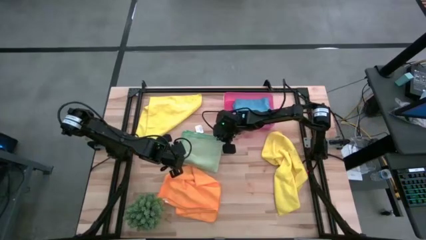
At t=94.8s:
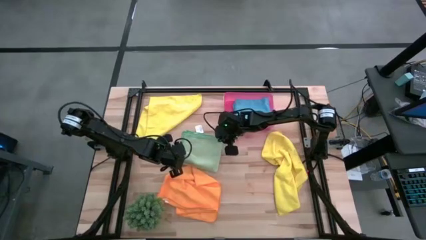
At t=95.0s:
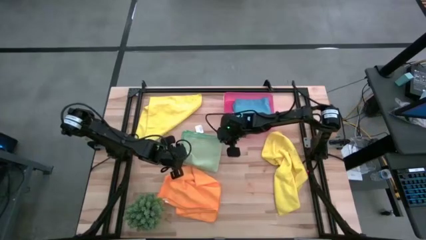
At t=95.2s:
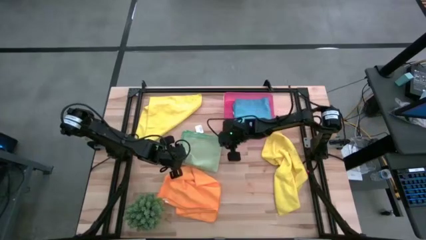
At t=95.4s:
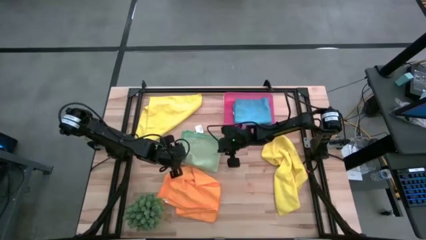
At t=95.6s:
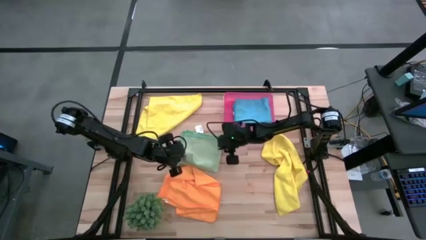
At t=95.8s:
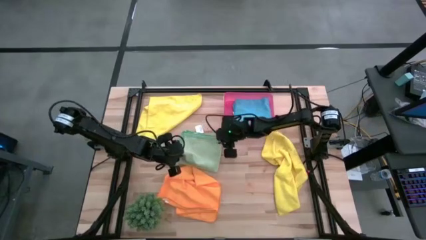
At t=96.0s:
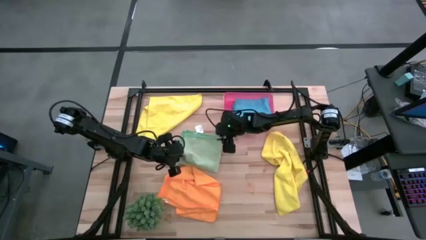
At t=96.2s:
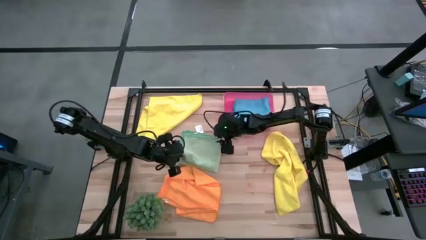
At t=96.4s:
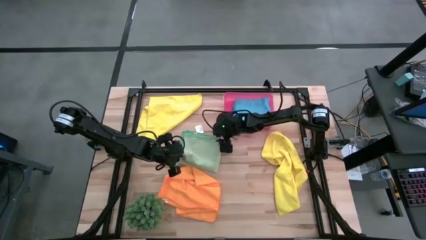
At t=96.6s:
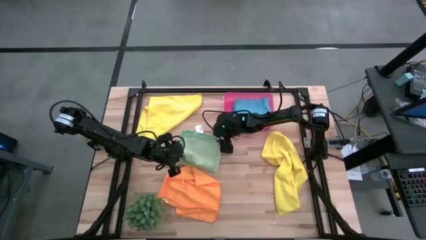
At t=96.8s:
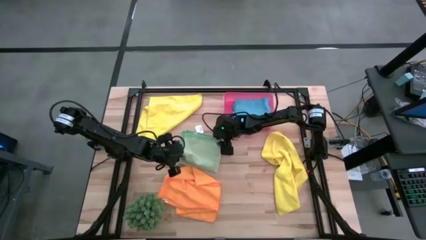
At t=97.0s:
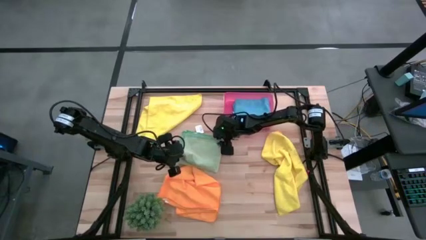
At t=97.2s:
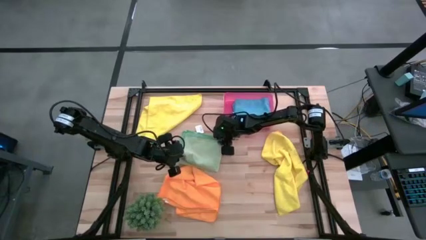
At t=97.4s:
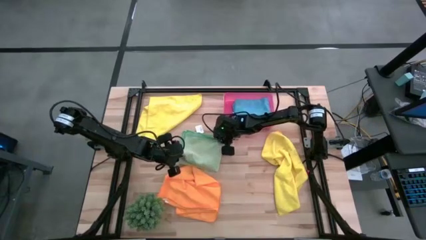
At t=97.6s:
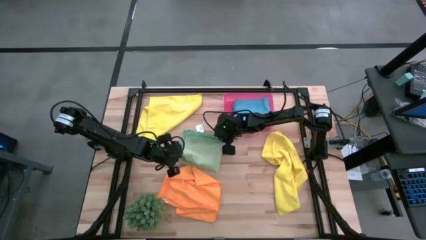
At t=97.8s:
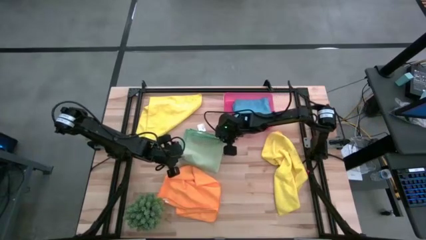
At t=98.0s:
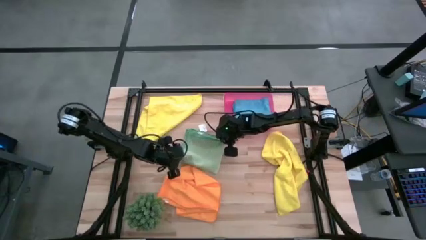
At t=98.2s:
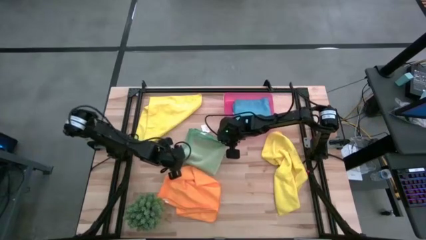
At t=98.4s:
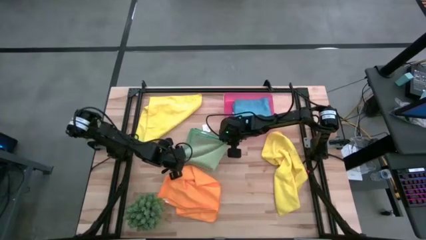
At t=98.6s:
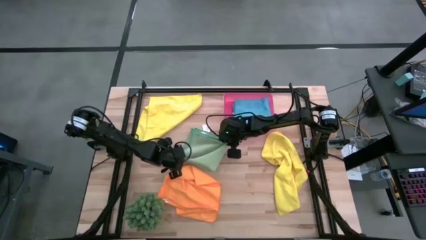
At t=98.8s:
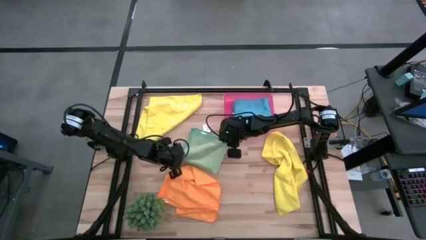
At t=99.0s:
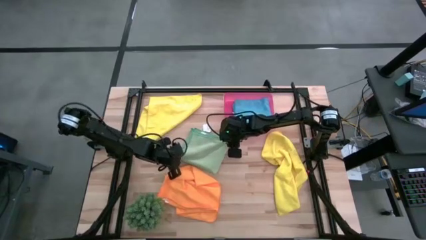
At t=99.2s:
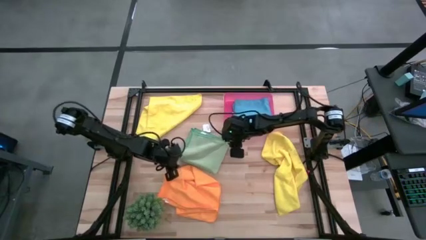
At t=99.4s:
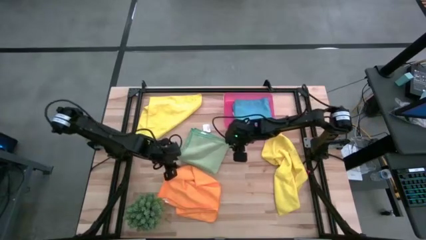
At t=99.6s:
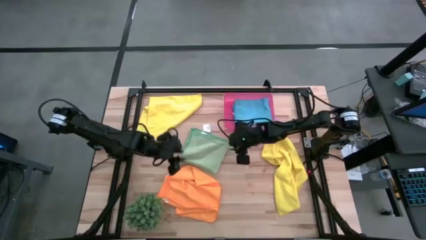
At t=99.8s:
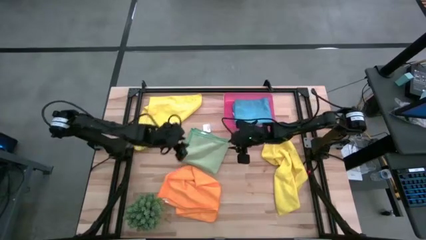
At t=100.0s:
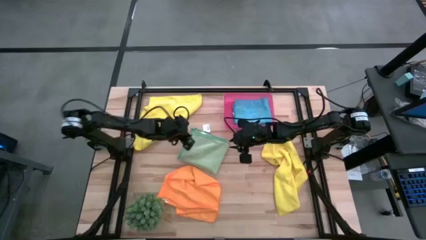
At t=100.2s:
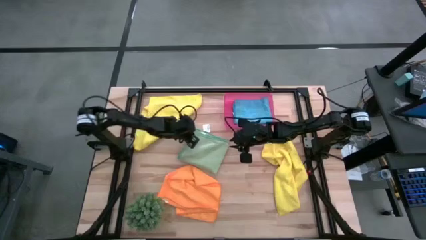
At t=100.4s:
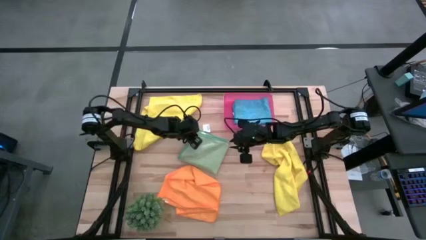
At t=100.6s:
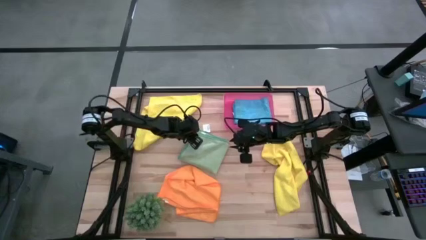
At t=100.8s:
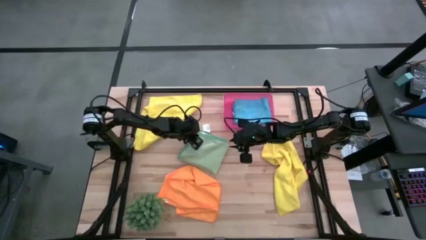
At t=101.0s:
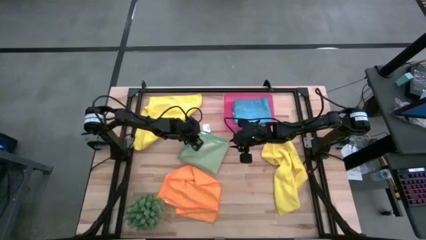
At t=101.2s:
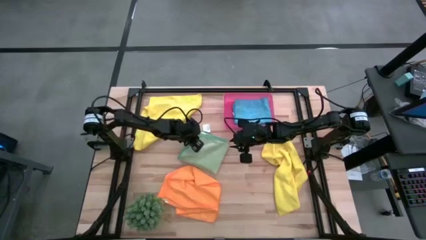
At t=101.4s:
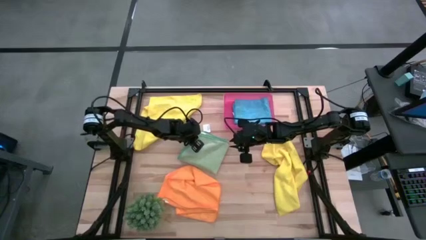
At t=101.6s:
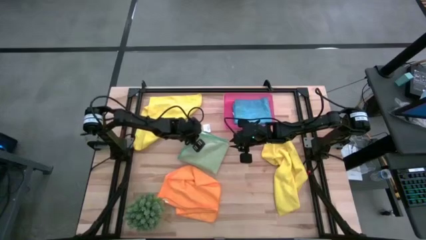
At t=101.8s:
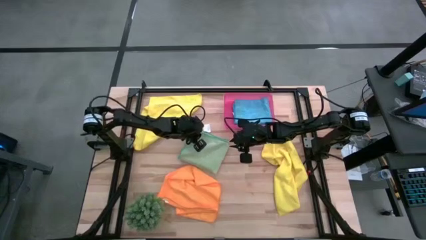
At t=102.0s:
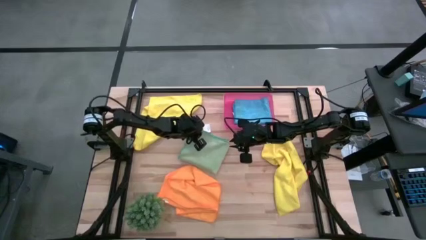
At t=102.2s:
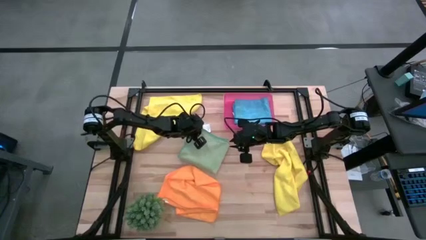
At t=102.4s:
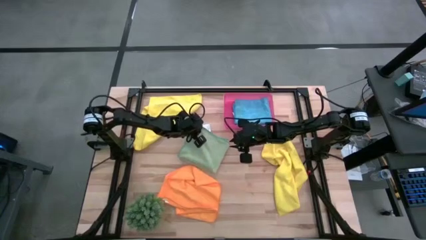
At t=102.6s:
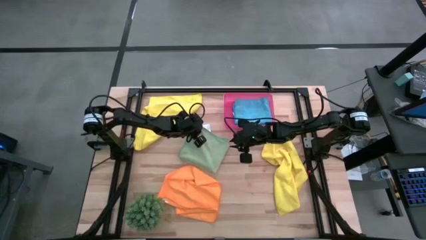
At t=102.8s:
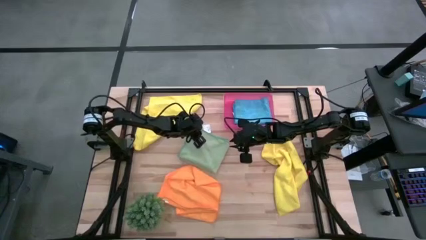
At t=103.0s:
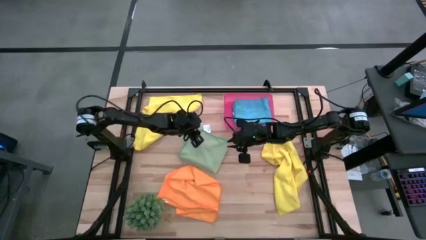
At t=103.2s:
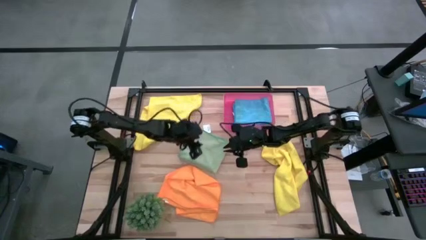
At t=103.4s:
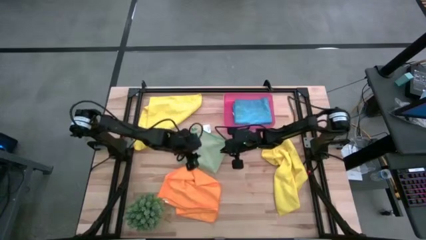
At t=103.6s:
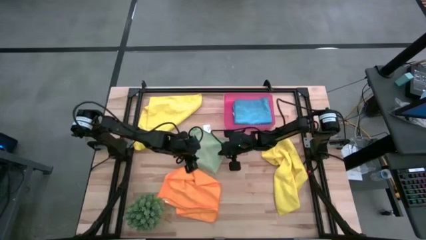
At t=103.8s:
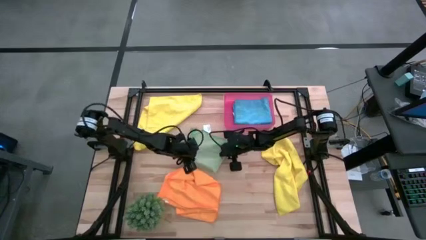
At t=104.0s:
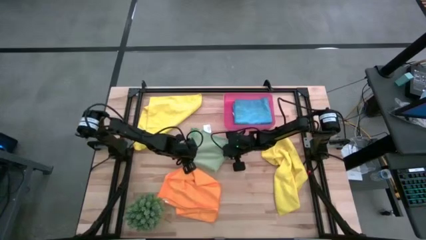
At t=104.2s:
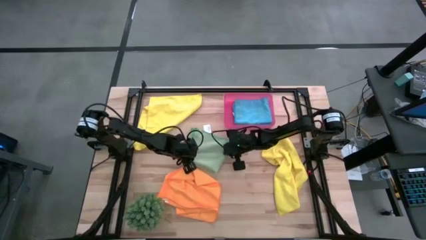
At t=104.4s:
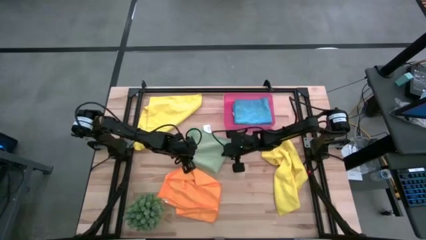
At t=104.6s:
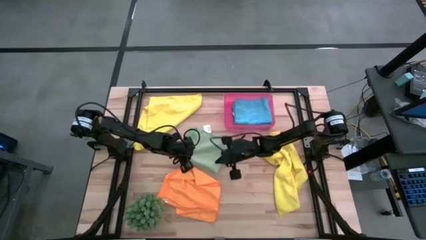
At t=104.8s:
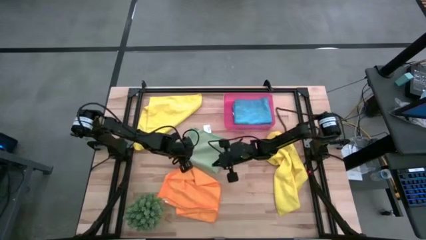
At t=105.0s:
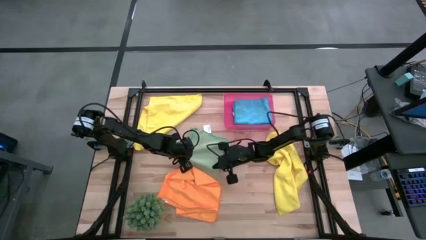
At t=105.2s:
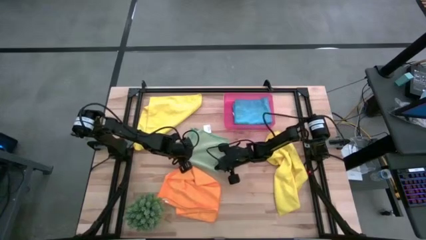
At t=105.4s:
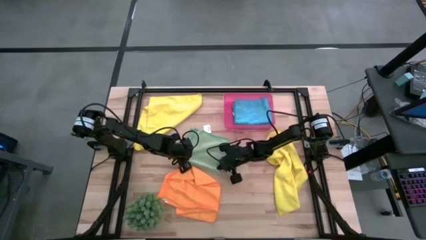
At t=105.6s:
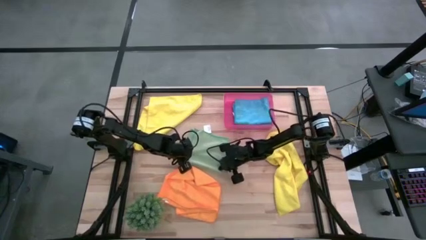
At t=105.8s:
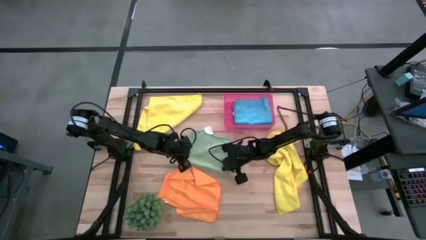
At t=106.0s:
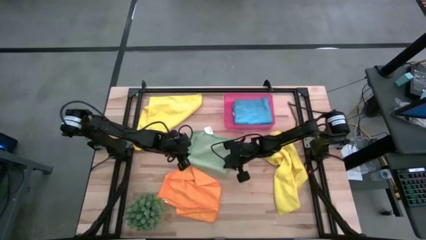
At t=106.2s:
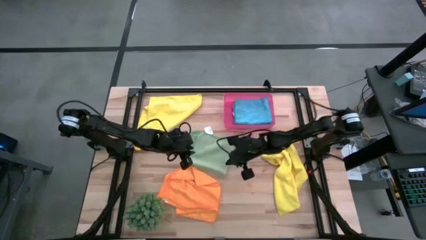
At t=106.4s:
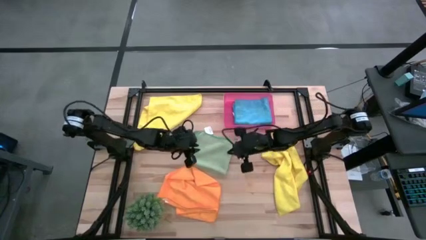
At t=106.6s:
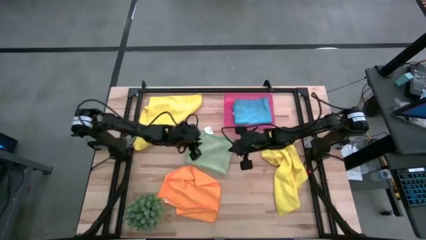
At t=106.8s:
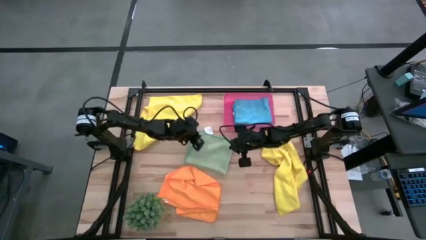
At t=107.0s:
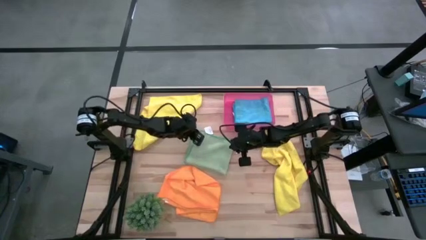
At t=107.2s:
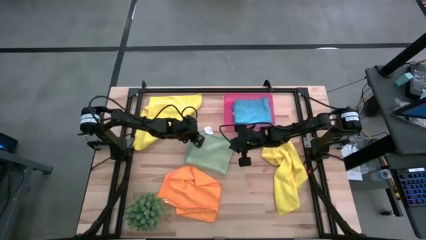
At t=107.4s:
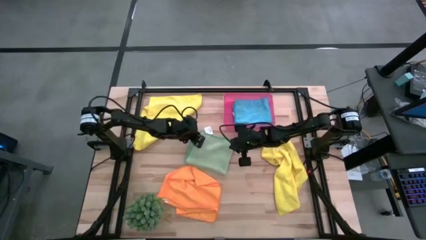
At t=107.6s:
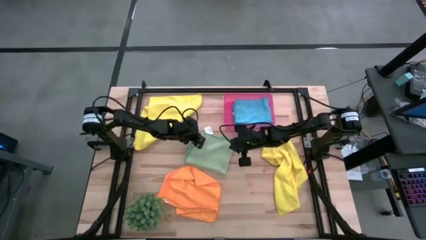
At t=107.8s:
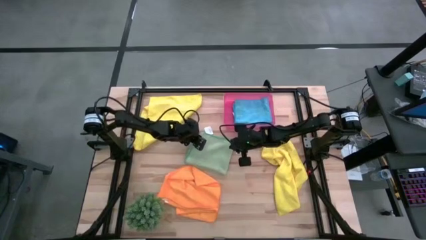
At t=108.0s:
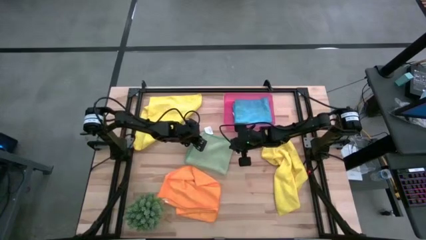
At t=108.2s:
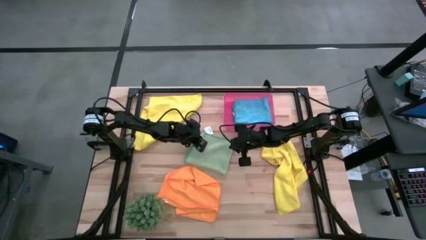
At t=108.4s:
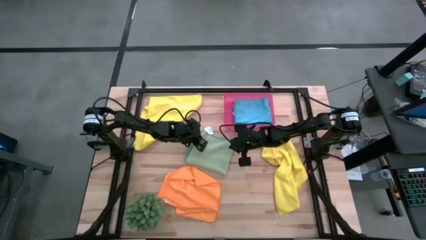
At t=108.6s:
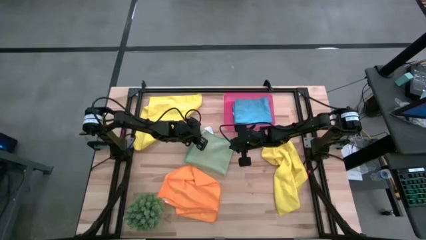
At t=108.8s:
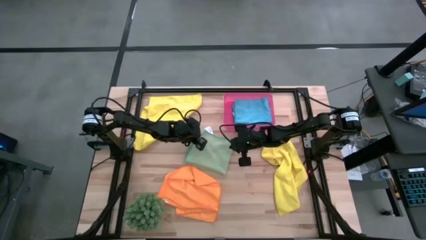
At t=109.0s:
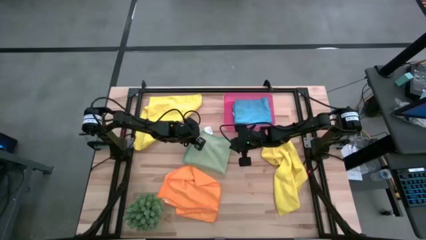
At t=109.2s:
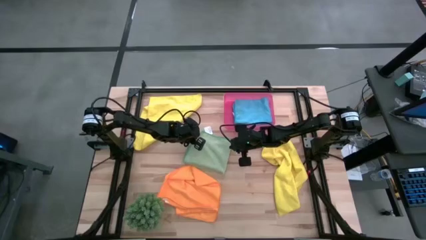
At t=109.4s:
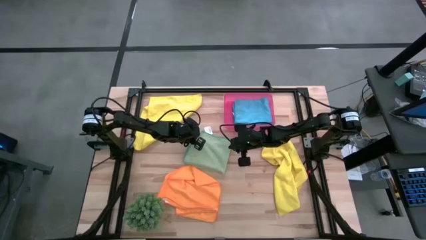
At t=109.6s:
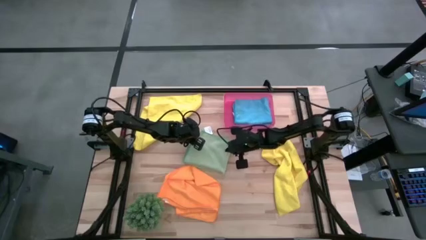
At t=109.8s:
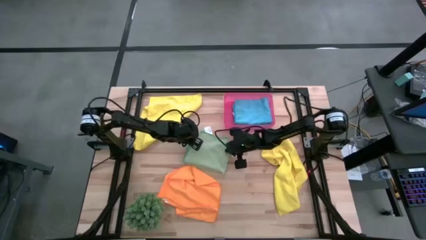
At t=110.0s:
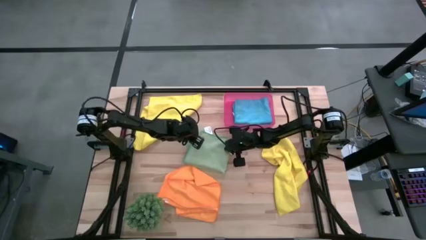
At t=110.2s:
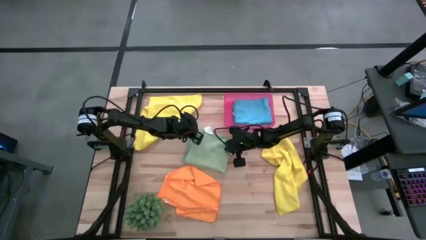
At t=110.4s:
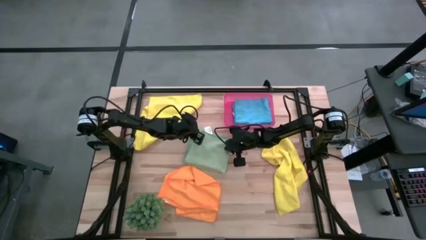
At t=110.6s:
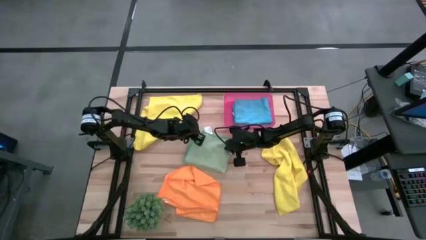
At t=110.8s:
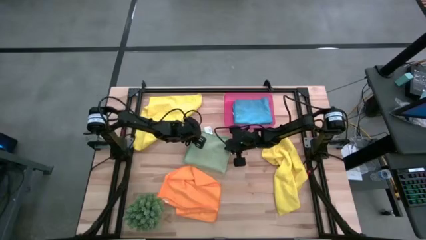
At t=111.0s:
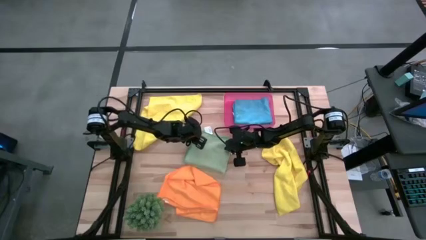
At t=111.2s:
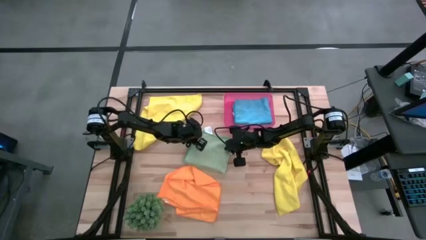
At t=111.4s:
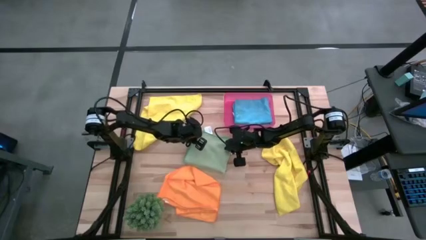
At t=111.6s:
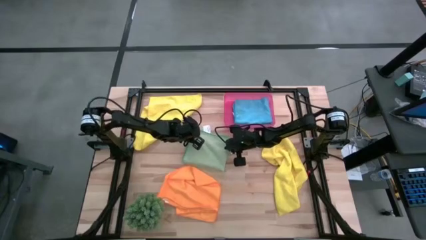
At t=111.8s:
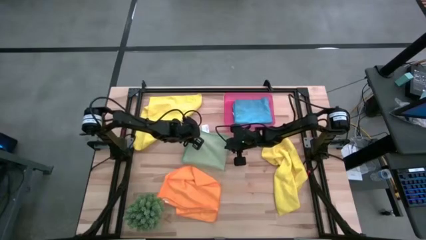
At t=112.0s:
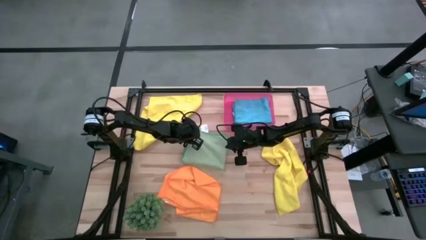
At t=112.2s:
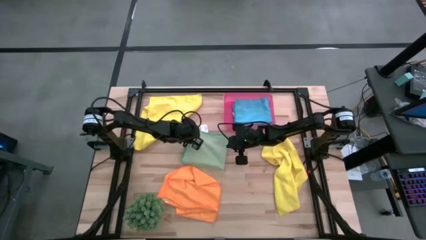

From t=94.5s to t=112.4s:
Task: Fold microfiber towels
Fold the green microfiber cloth
